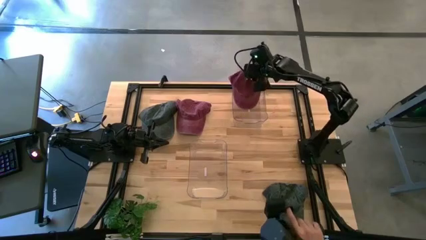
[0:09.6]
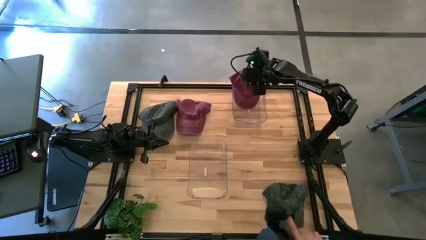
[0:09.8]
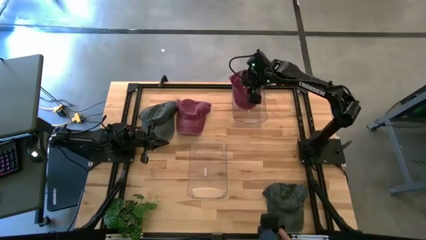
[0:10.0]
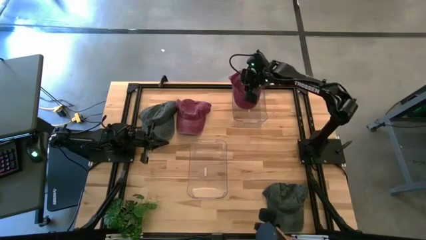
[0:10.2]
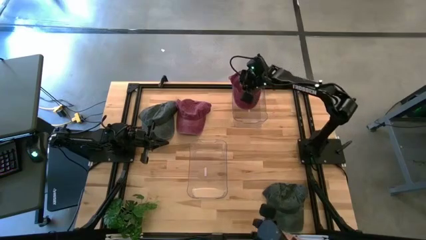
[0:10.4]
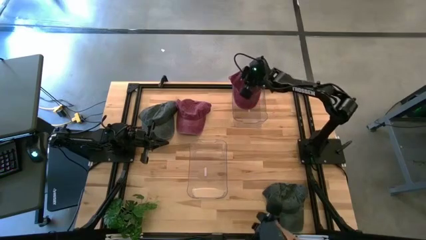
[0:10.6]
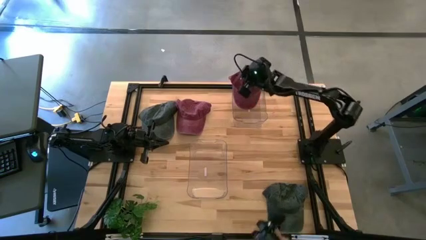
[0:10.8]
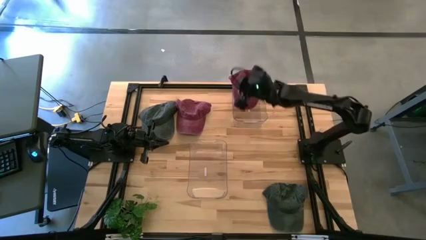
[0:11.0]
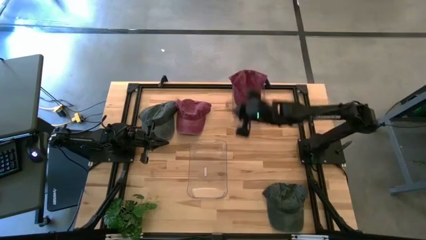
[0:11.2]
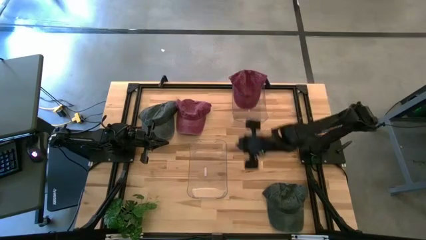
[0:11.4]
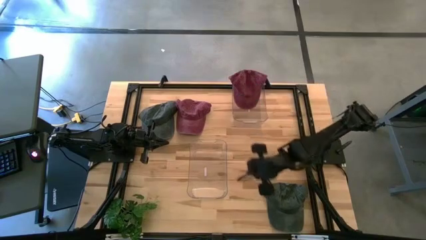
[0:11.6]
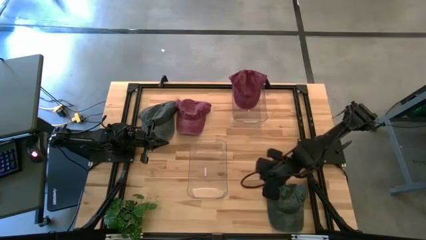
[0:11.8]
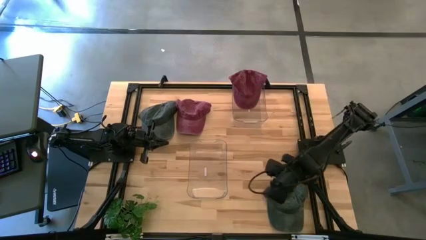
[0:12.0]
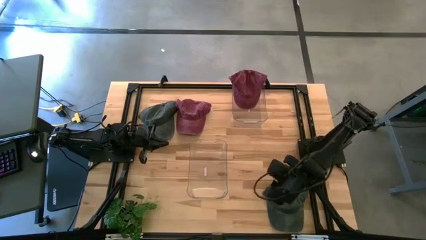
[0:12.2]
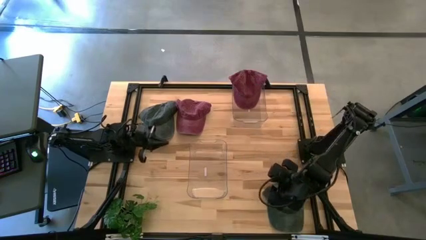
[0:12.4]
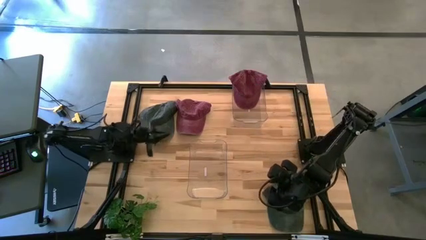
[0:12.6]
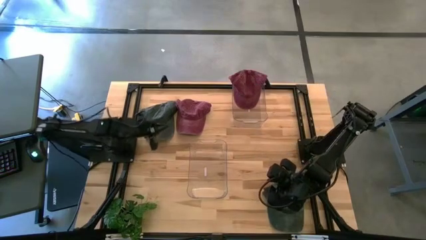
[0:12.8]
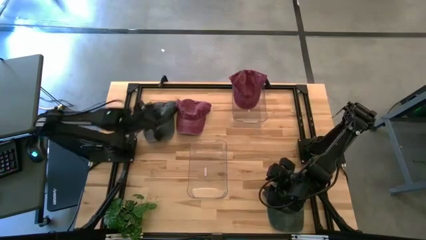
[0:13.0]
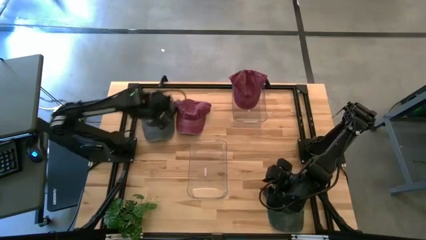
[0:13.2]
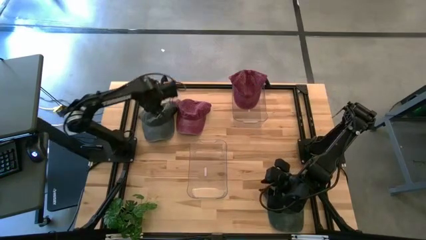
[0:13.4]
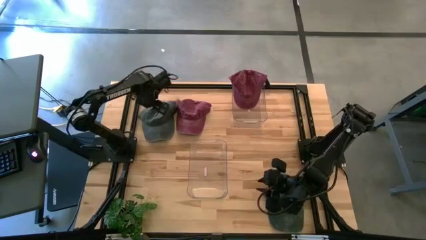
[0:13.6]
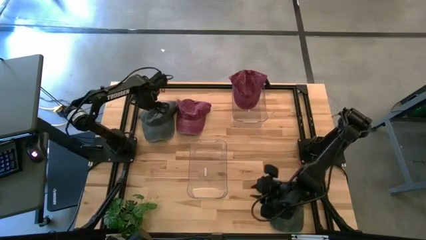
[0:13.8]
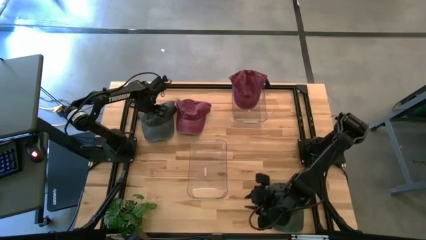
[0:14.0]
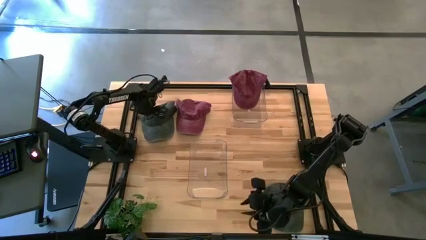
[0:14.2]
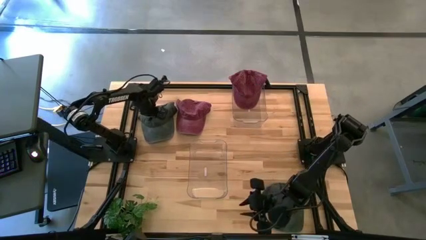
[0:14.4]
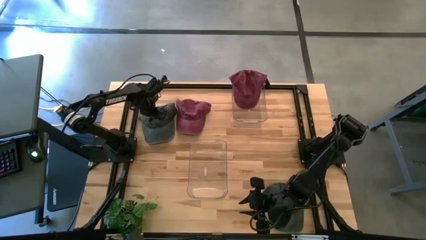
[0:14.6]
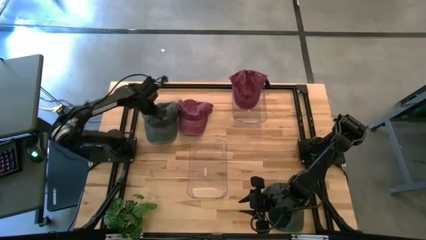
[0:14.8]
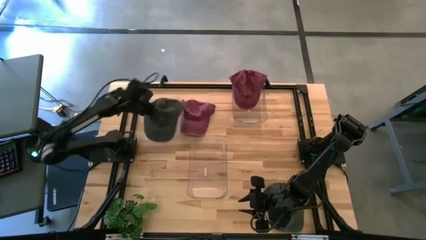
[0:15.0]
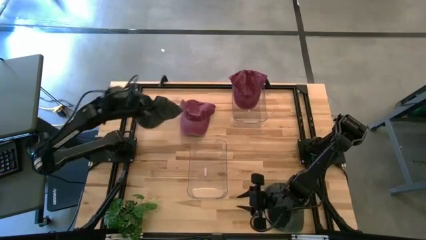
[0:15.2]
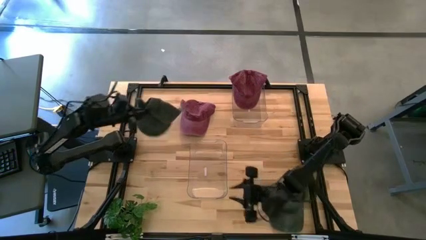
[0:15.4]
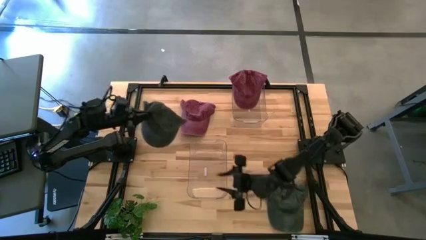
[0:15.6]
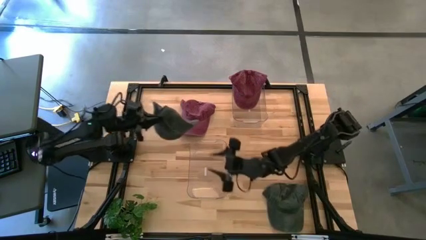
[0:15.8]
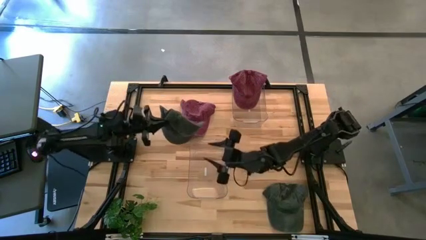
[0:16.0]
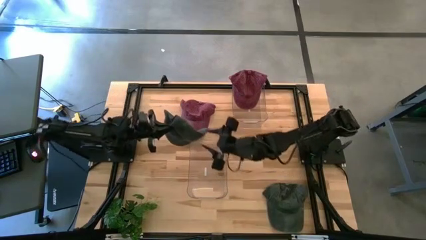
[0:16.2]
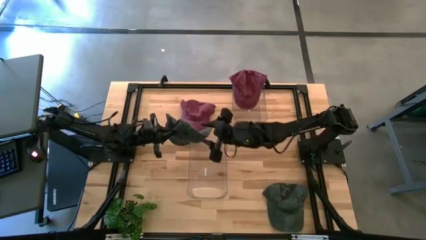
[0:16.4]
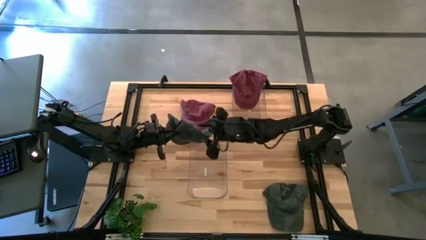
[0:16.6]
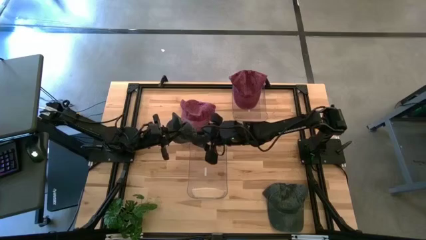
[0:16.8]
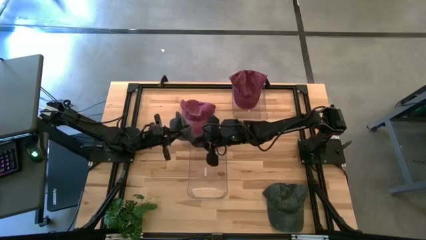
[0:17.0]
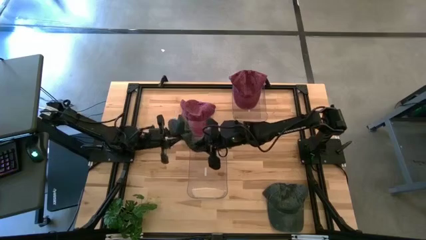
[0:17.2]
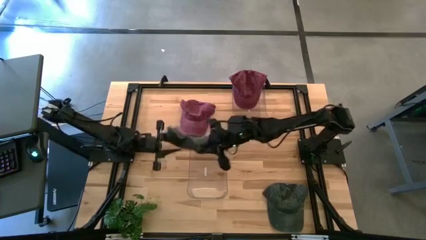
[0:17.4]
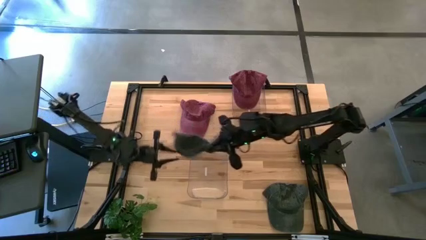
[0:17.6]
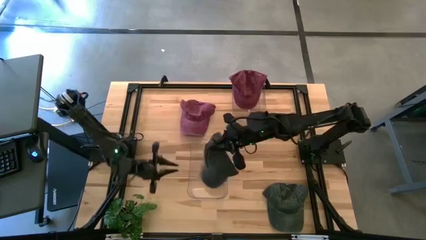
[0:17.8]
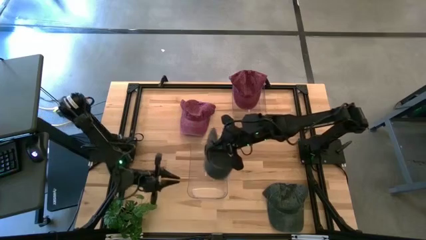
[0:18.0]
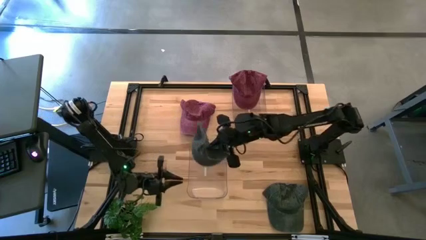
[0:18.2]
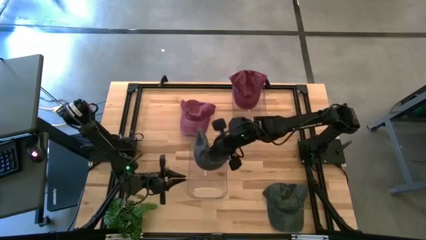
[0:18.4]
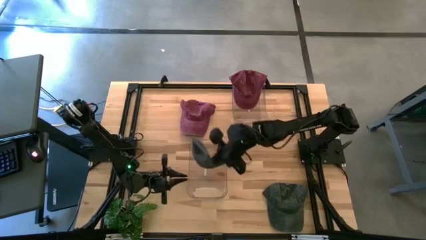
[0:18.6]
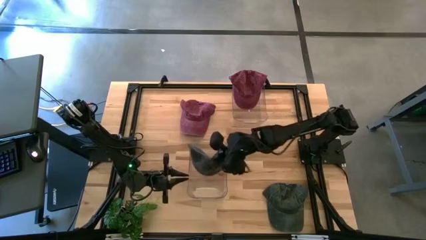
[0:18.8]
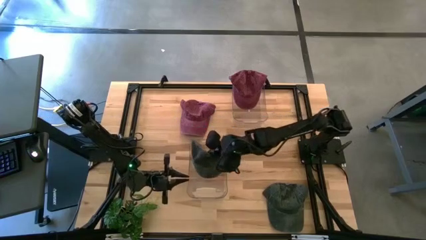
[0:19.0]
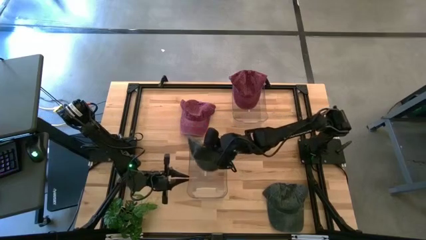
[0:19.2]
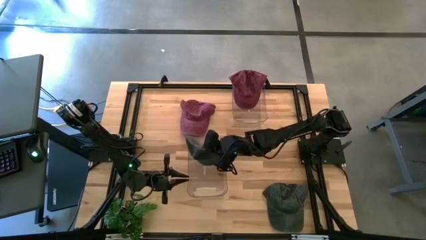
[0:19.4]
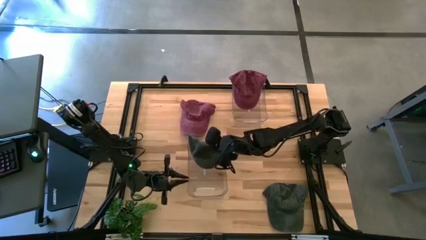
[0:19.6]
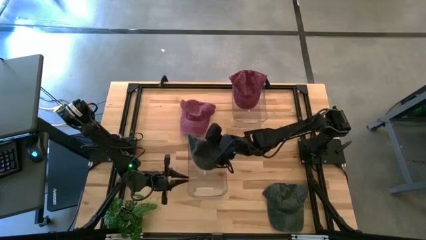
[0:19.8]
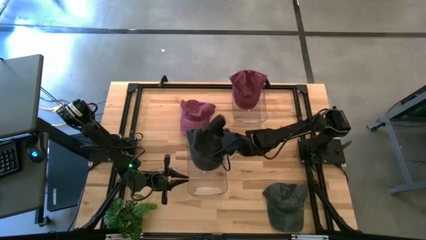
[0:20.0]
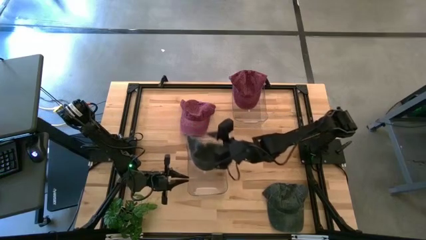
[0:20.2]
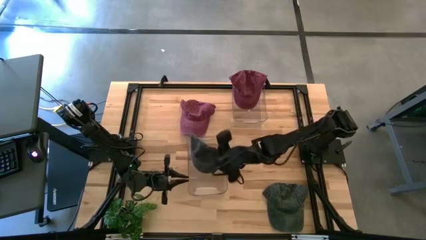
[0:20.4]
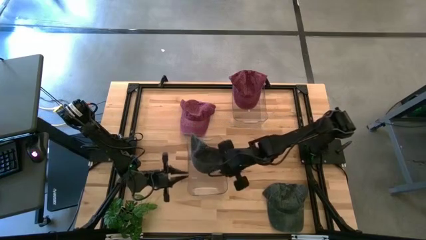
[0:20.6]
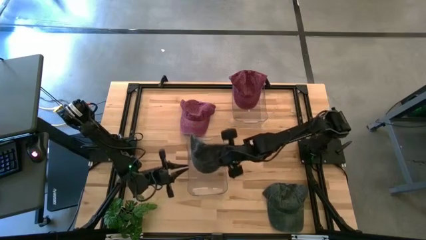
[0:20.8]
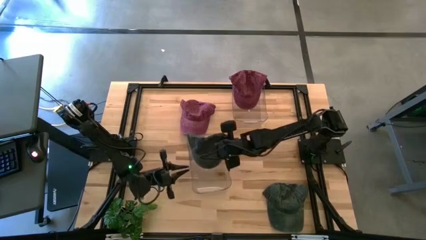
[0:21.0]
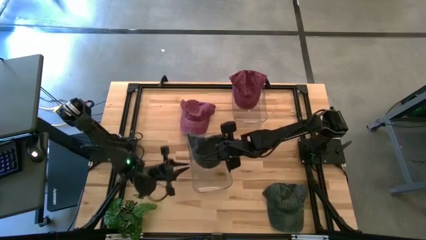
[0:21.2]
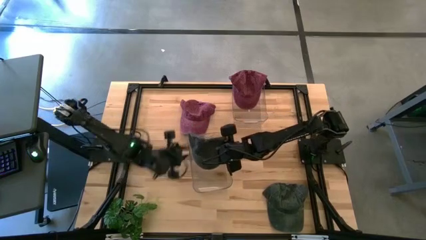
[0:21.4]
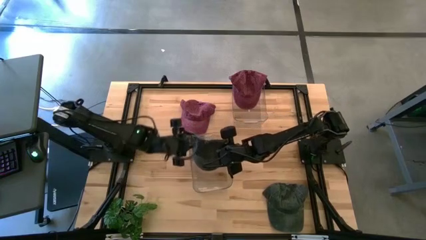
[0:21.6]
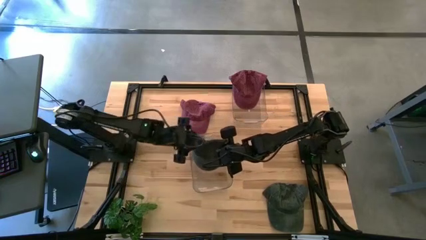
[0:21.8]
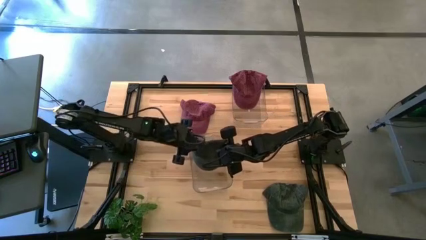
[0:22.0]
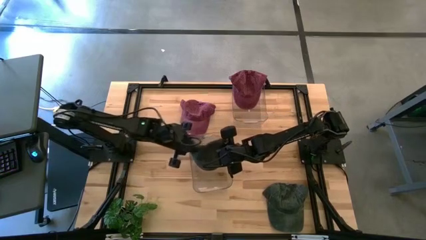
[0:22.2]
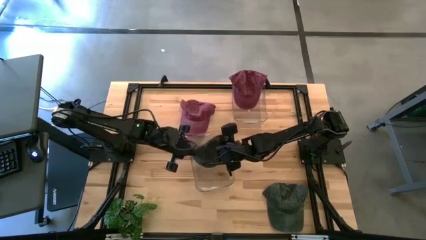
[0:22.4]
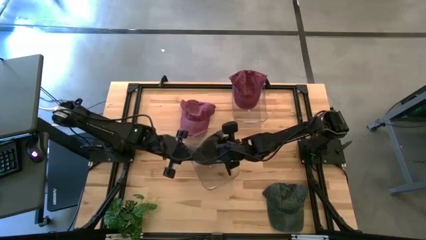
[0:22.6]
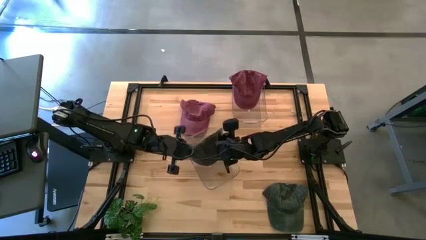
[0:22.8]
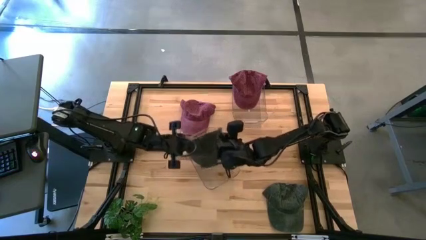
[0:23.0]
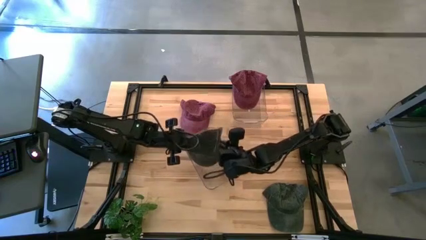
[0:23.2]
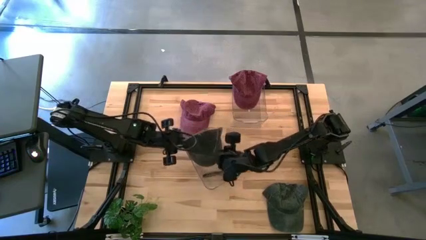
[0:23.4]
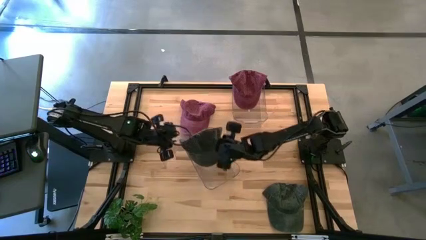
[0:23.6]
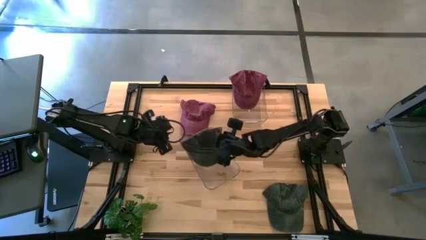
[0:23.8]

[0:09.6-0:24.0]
Task: Pick & Place hat
Put the top black cap into the bottom transparent bin

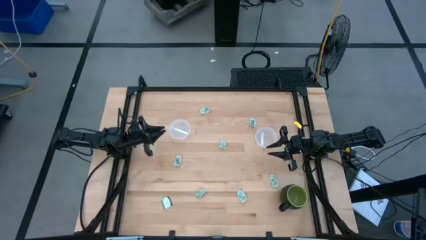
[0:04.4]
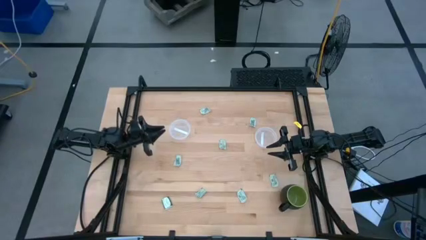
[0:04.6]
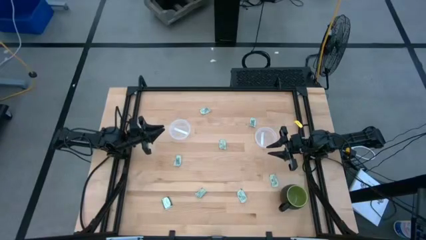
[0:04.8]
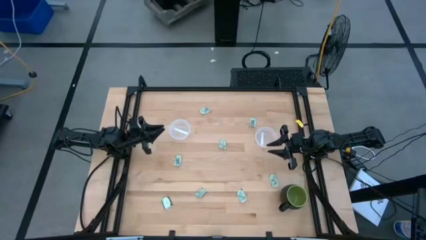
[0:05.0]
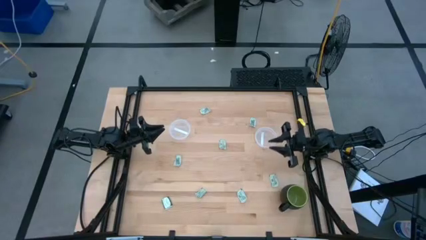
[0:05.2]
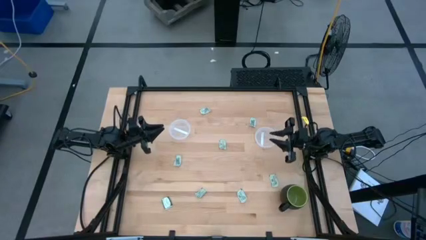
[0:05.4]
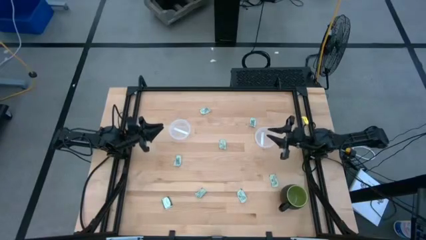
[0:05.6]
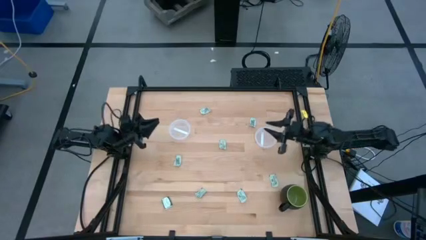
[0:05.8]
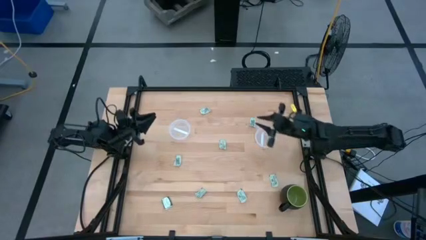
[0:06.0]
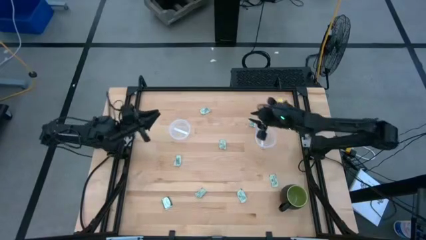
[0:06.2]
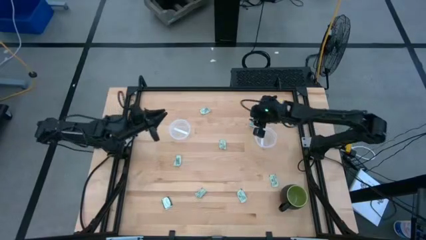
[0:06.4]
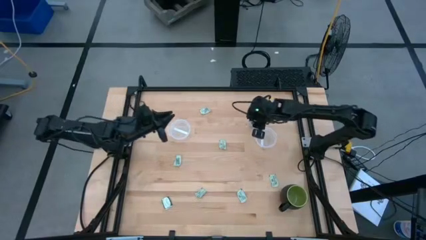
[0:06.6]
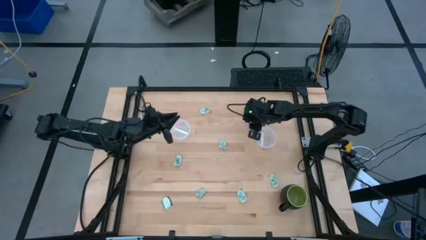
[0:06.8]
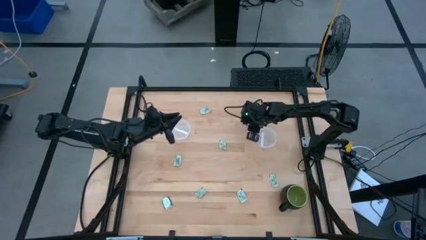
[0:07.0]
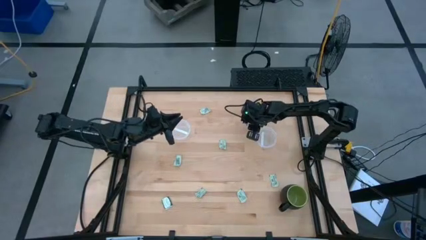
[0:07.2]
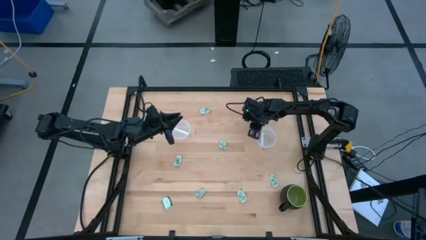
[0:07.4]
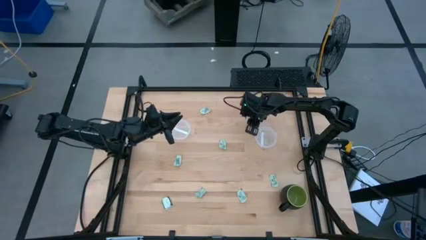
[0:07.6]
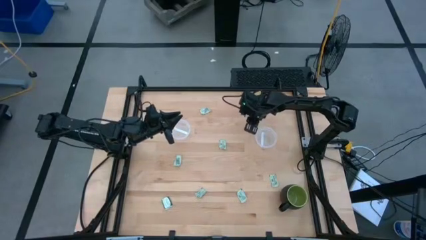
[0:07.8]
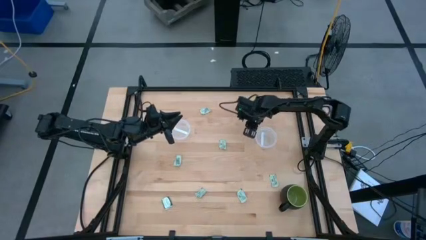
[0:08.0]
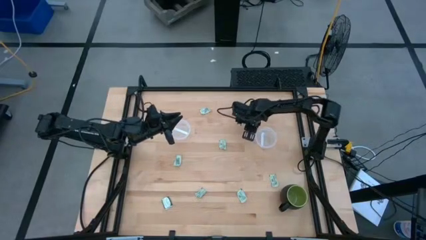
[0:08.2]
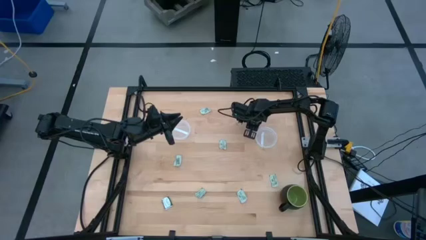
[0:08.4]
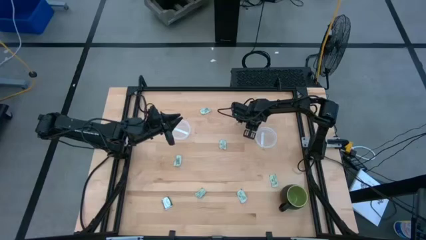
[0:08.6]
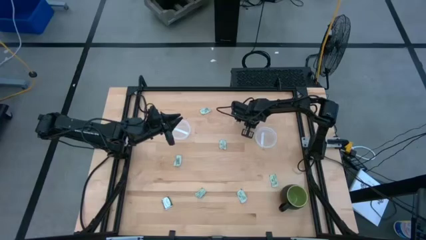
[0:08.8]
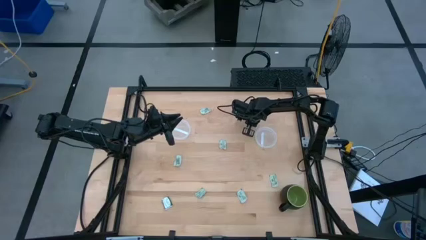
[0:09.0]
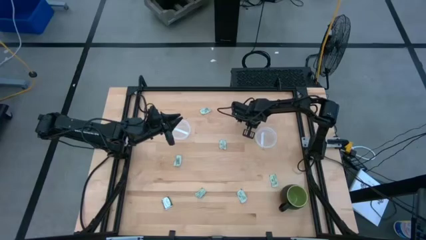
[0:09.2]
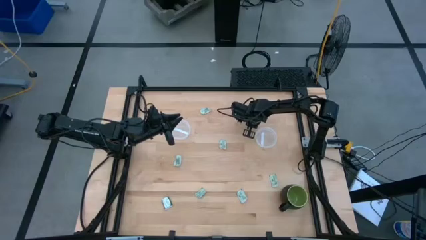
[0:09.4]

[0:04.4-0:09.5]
Task: Pick and place Stevia / Truvia into bins
Put the stevia packet into the right transparent container
